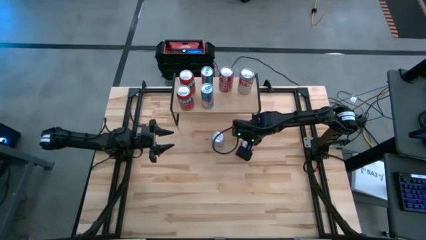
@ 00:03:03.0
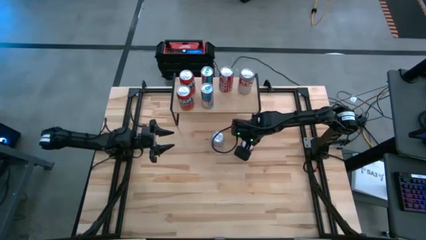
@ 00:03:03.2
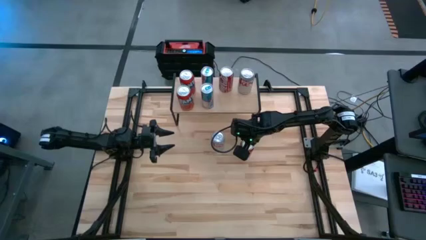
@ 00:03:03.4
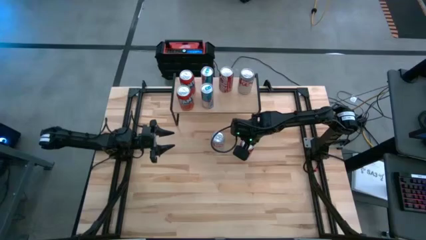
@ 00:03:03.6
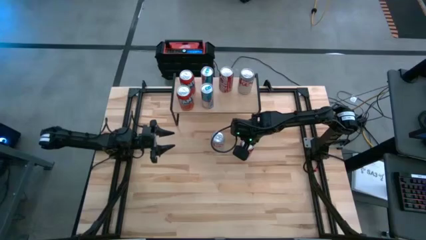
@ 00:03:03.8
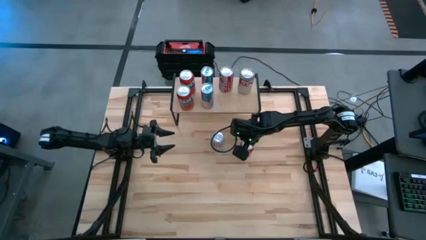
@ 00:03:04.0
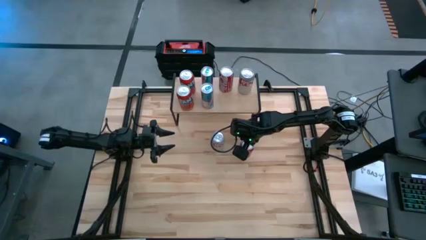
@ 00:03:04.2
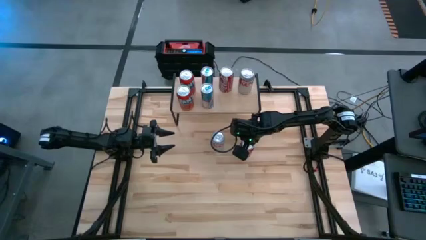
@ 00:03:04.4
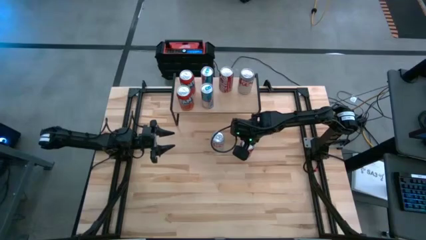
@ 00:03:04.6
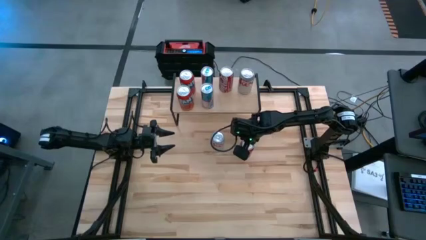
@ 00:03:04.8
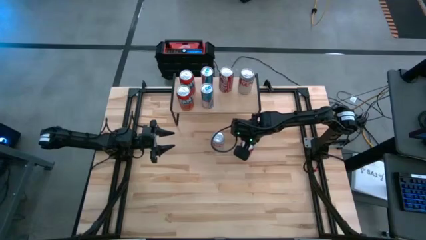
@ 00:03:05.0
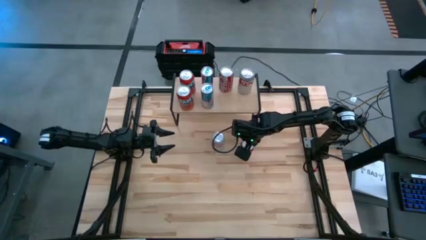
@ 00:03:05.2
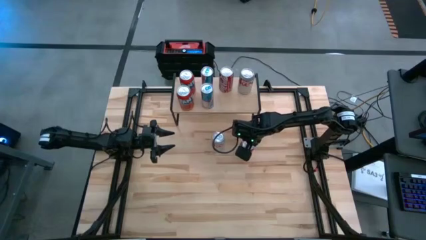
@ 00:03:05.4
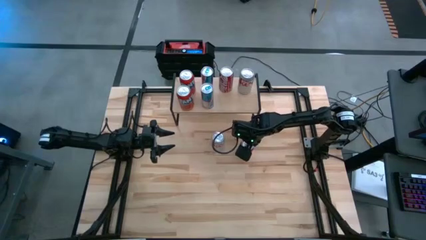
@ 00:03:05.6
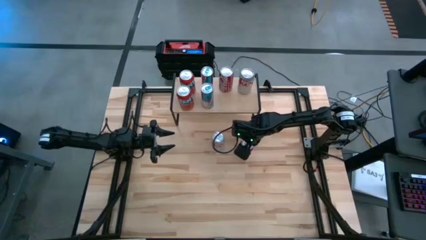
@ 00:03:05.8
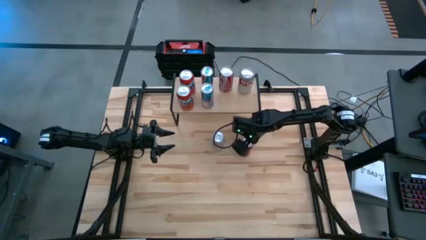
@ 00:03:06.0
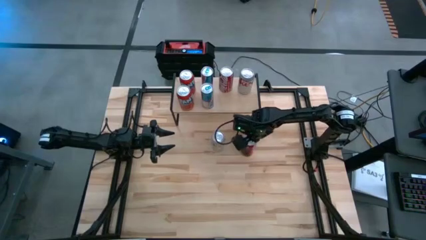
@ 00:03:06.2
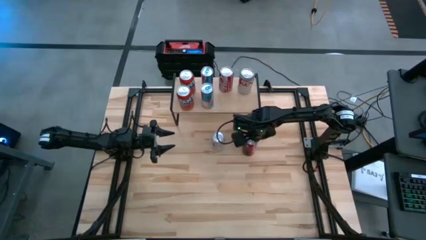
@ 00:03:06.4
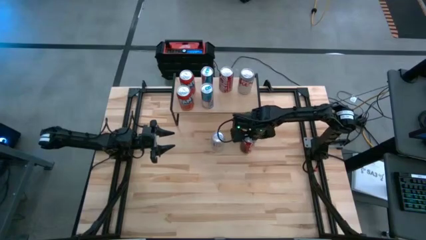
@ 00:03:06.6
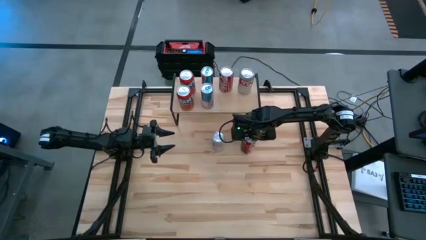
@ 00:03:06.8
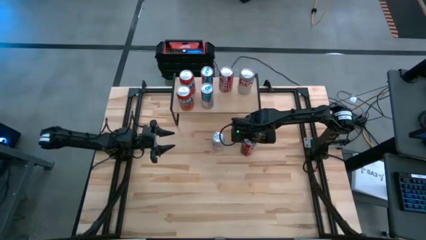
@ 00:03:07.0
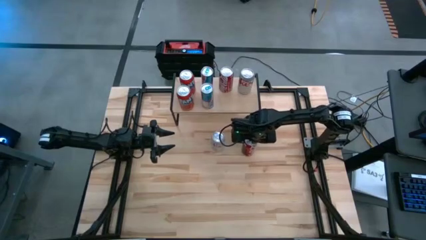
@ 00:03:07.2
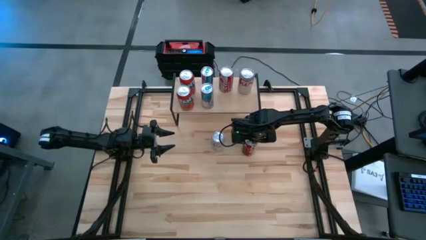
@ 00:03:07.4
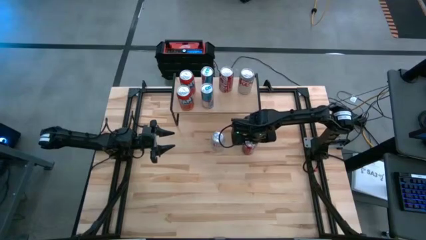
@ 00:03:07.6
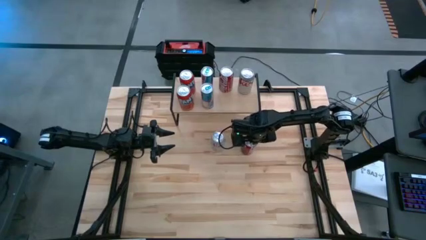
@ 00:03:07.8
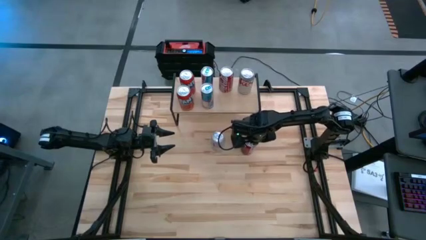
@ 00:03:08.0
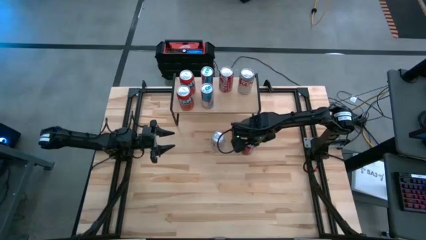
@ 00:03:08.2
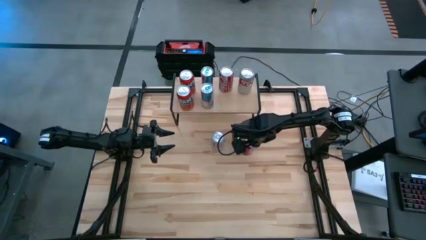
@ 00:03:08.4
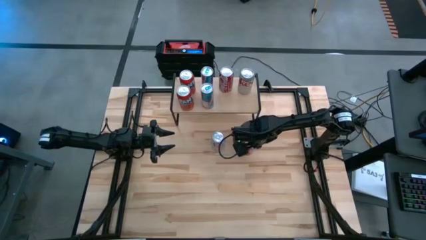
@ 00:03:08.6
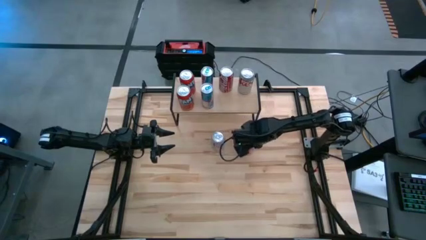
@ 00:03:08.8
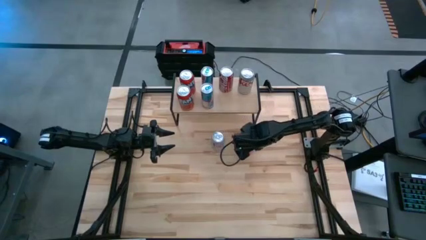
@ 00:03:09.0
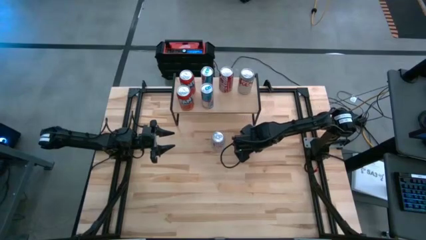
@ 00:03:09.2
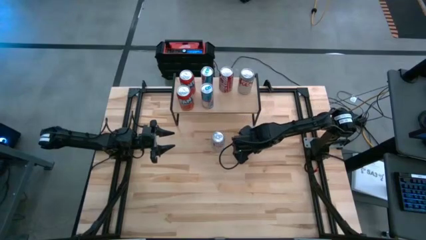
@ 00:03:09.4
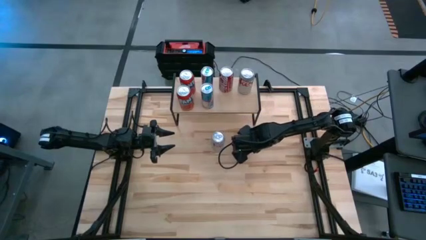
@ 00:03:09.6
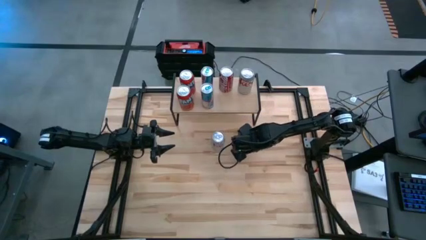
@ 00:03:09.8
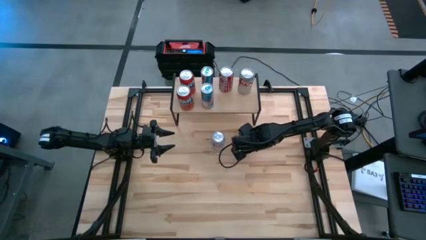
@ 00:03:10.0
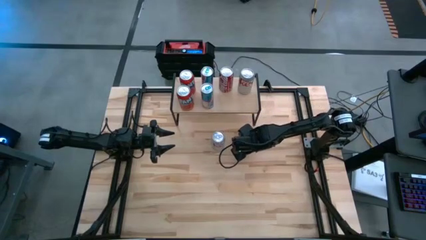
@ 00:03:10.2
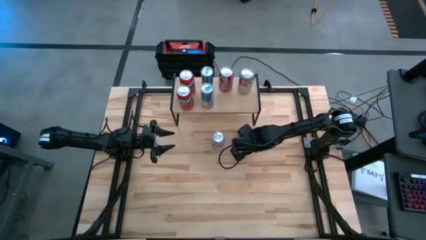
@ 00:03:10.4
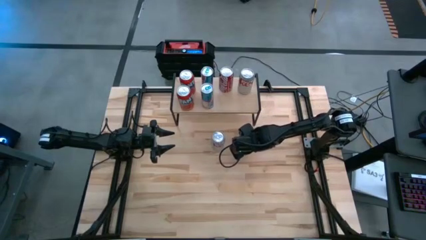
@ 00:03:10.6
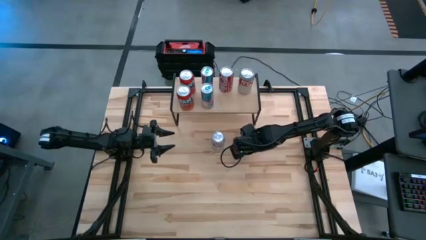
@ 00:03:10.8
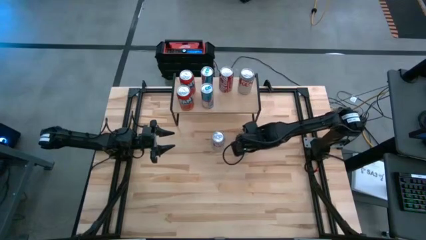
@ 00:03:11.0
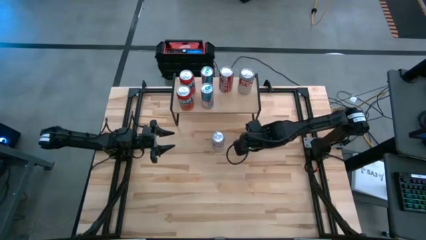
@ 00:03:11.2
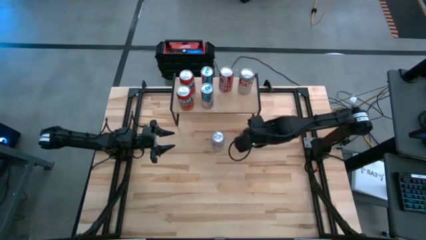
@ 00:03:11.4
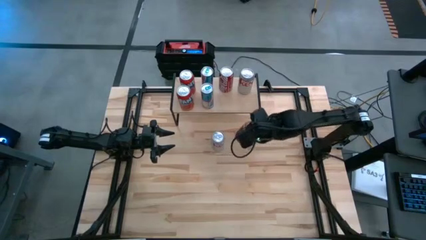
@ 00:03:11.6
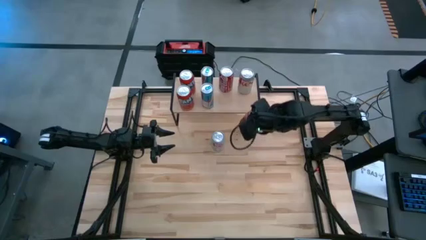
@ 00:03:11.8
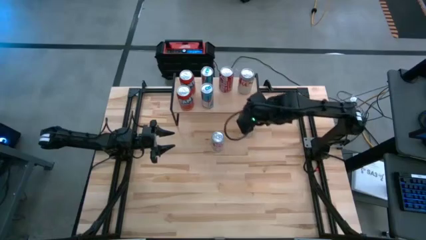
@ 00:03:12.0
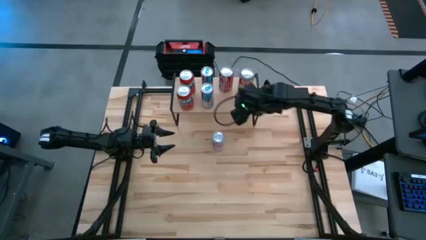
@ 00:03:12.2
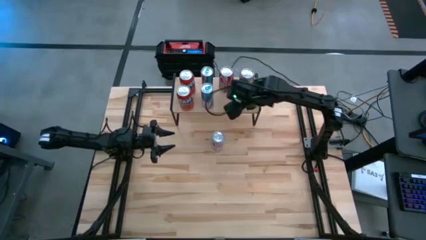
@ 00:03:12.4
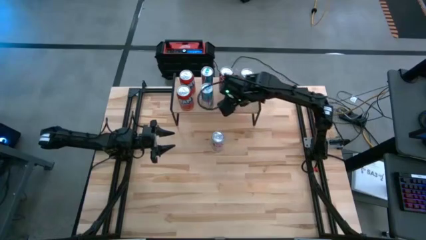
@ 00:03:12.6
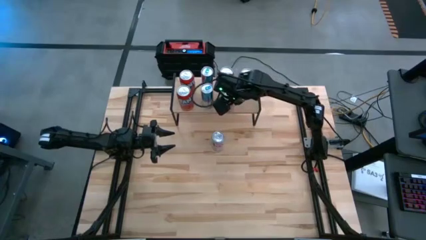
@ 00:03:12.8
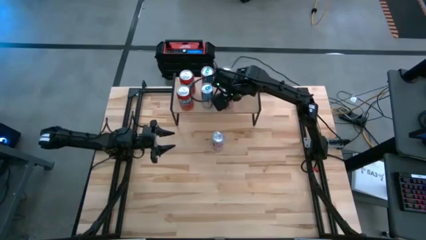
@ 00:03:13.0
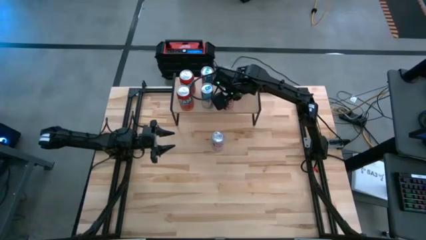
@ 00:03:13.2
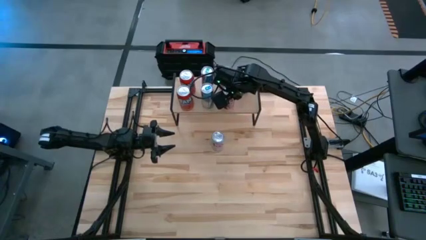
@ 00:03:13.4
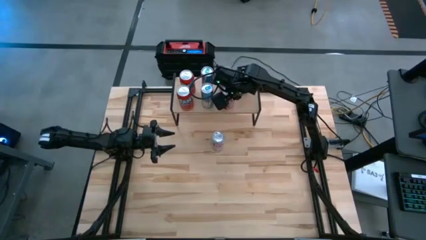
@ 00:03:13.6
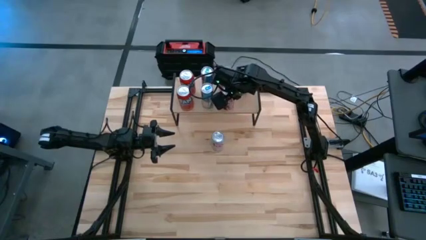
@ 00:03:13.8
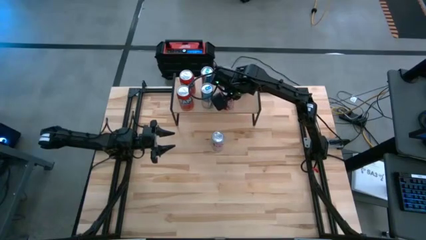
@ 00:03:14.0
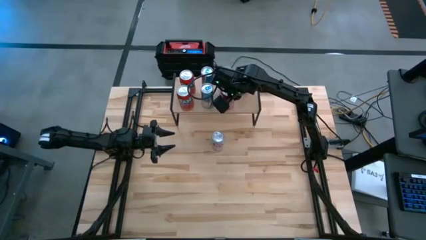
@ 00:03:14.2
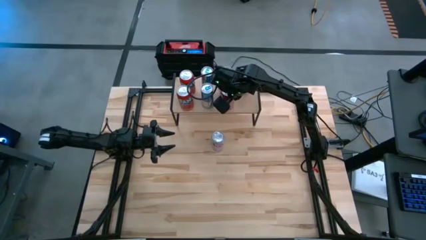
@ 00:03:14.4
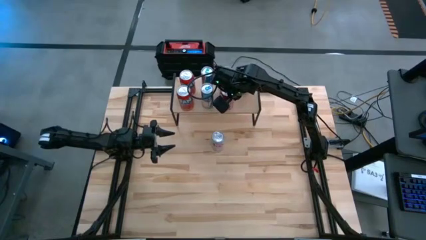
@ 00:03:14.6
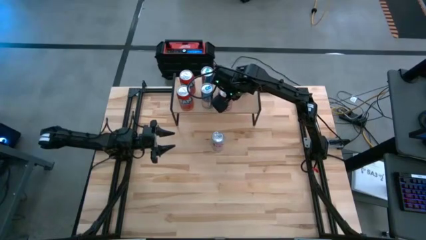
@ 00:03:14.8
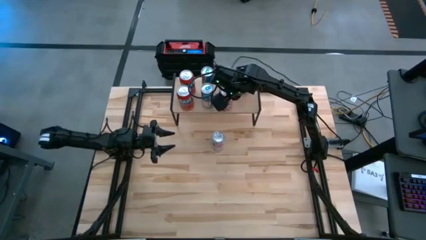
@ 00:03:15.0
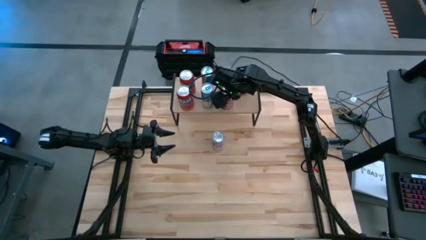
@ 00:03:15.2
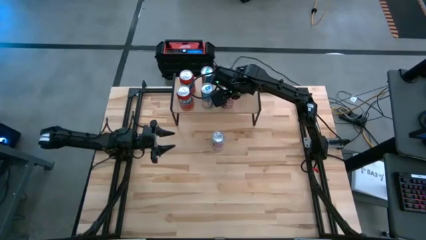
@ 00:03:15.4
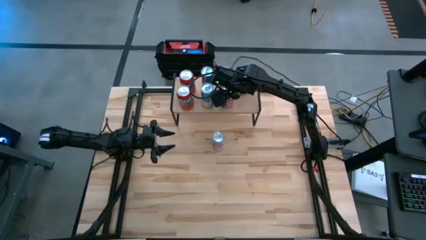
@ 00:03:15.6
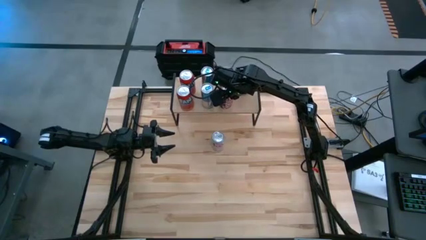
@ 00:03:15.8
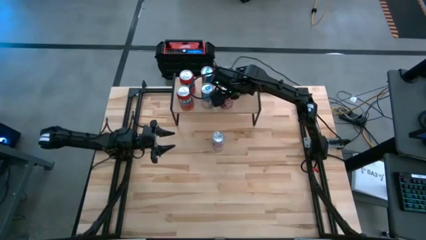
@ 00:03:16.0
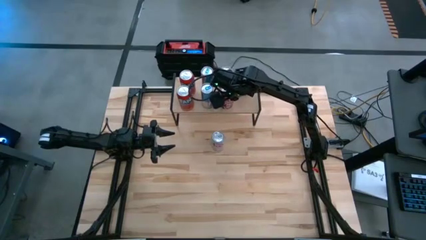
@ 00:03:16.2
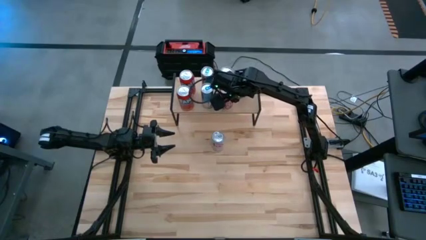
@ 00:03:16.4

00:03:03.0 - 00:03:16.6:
Task: Place canned beverage on shelf
Put the red and white soda can on the shelf aligned with the other red and white soda can
